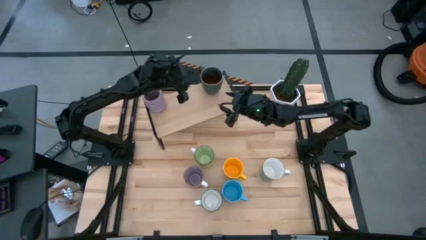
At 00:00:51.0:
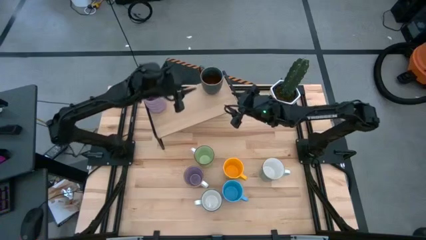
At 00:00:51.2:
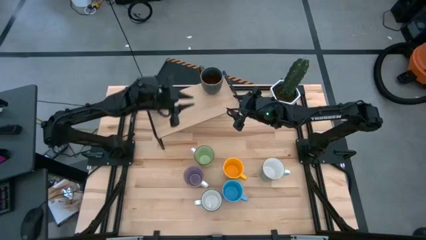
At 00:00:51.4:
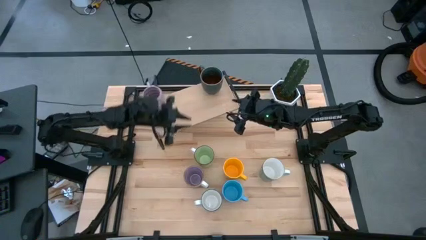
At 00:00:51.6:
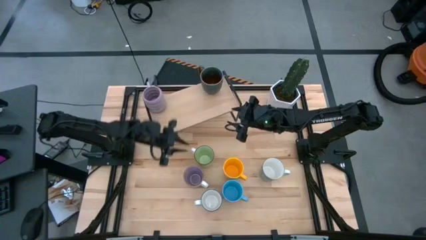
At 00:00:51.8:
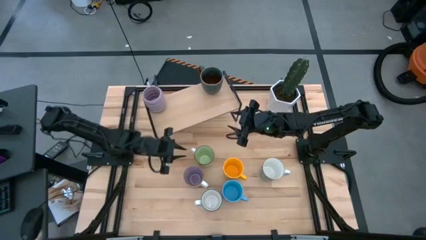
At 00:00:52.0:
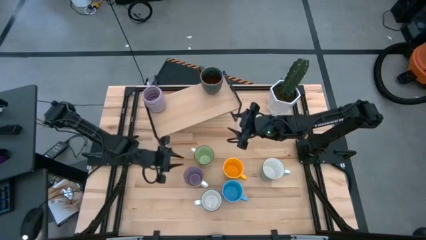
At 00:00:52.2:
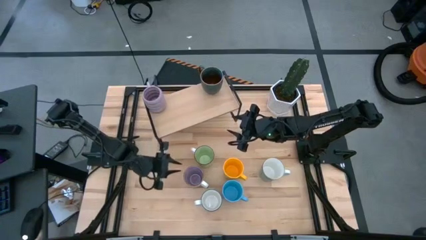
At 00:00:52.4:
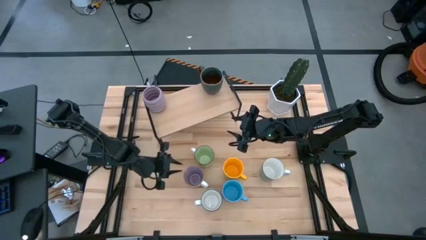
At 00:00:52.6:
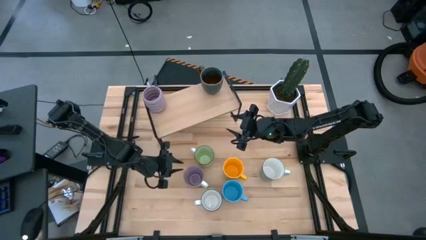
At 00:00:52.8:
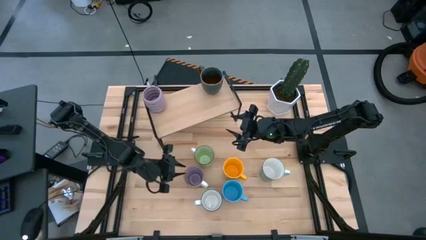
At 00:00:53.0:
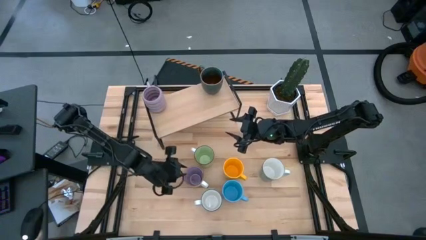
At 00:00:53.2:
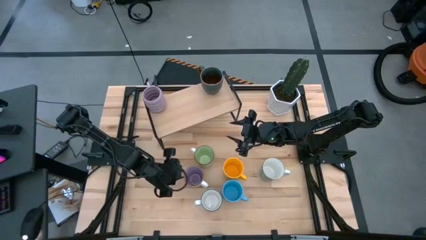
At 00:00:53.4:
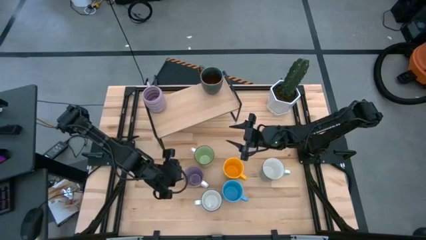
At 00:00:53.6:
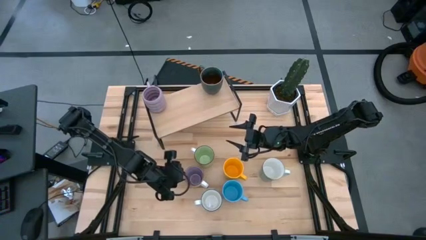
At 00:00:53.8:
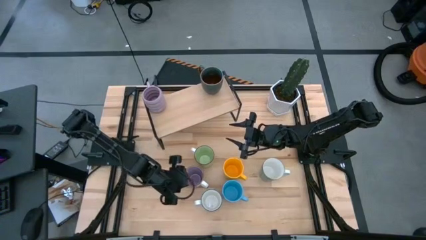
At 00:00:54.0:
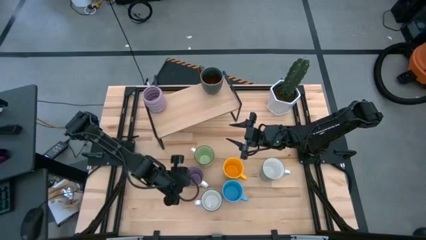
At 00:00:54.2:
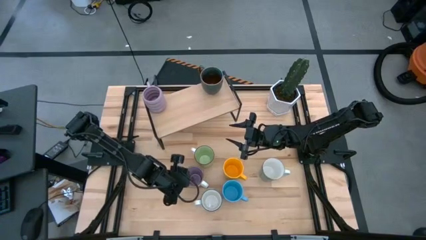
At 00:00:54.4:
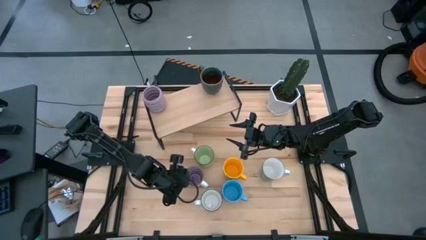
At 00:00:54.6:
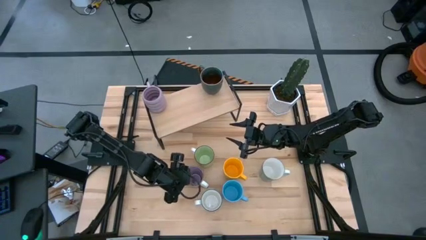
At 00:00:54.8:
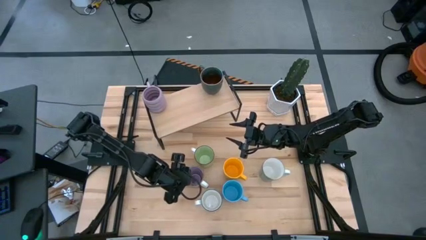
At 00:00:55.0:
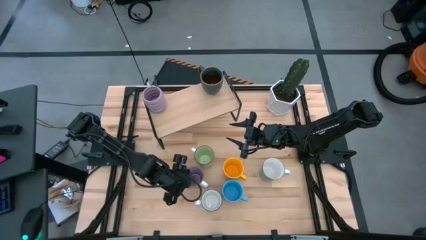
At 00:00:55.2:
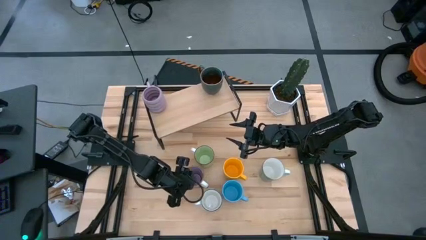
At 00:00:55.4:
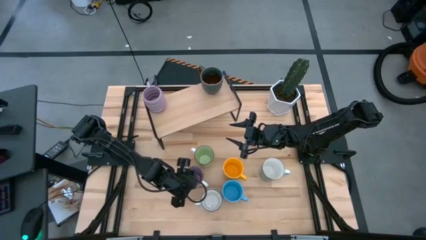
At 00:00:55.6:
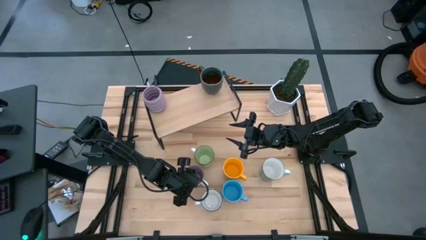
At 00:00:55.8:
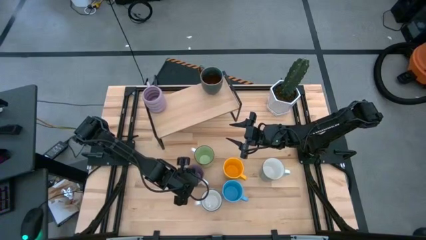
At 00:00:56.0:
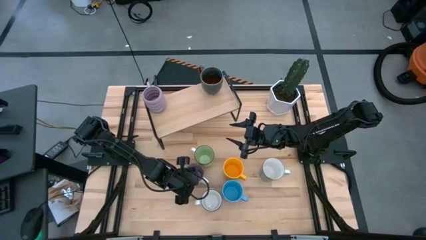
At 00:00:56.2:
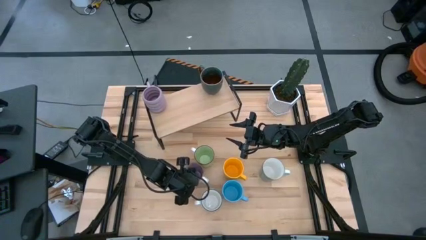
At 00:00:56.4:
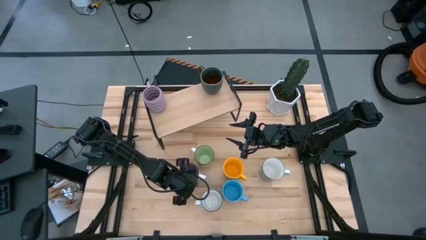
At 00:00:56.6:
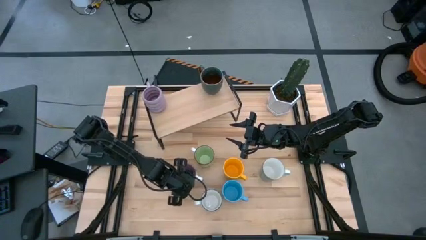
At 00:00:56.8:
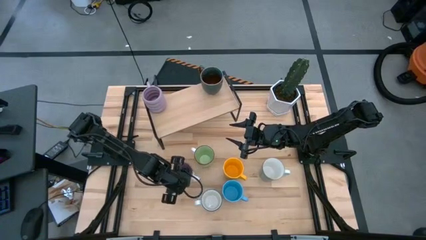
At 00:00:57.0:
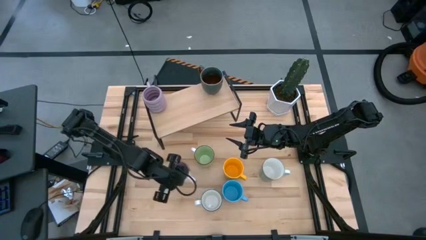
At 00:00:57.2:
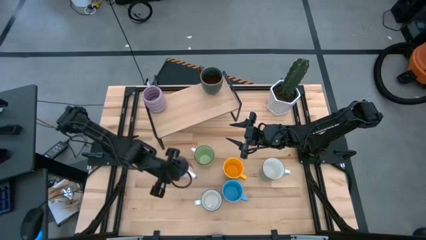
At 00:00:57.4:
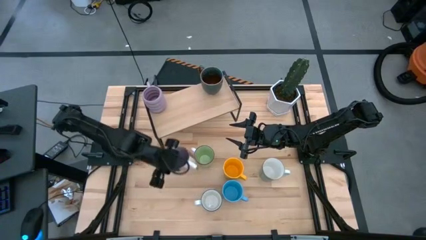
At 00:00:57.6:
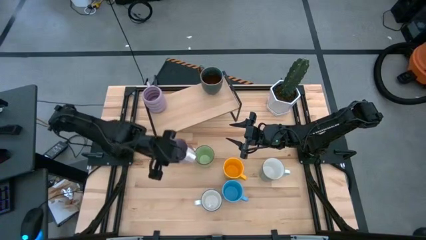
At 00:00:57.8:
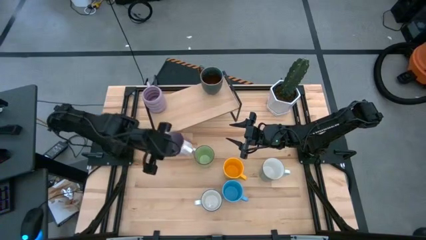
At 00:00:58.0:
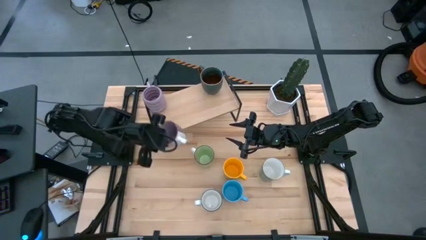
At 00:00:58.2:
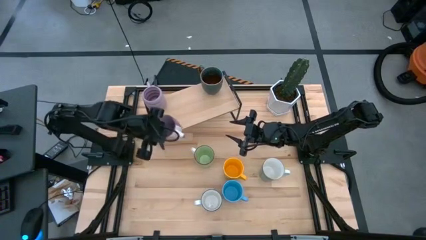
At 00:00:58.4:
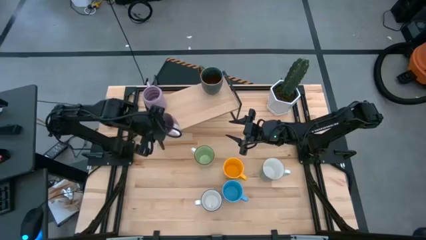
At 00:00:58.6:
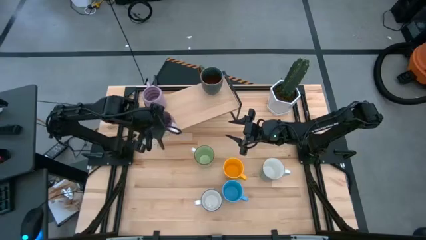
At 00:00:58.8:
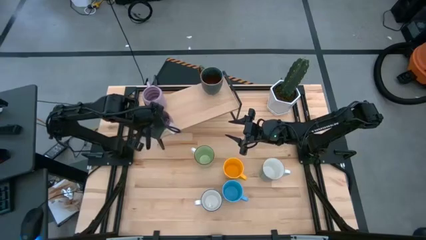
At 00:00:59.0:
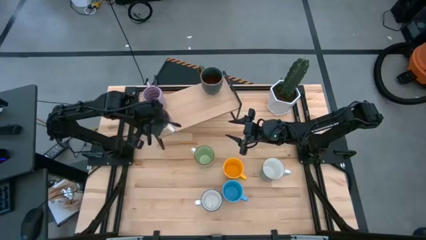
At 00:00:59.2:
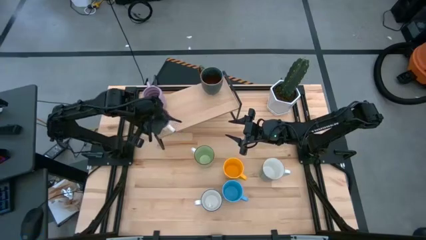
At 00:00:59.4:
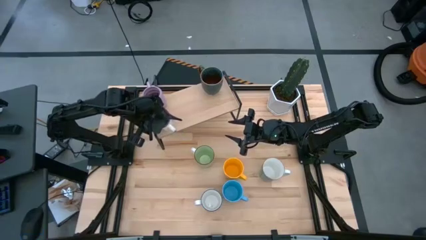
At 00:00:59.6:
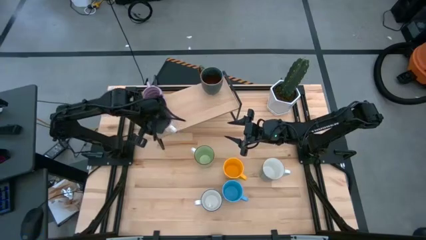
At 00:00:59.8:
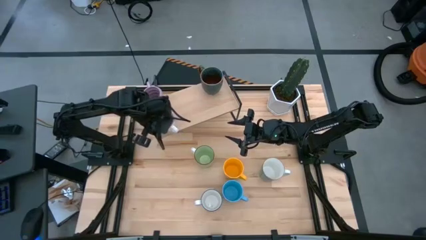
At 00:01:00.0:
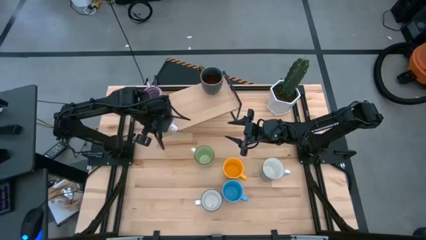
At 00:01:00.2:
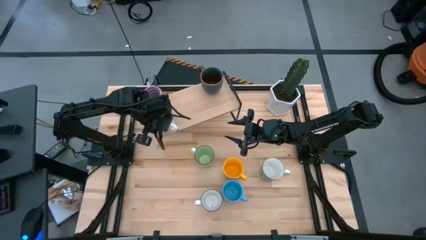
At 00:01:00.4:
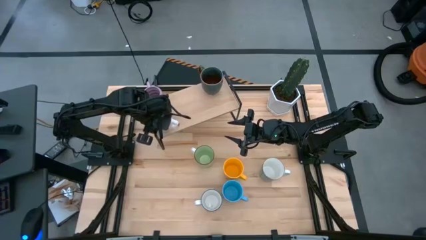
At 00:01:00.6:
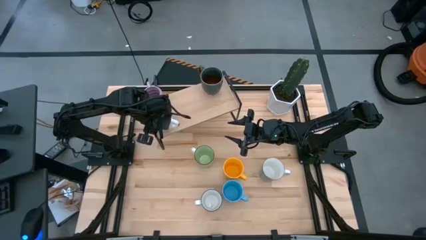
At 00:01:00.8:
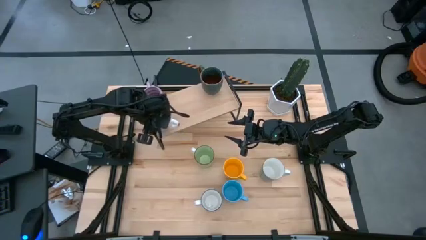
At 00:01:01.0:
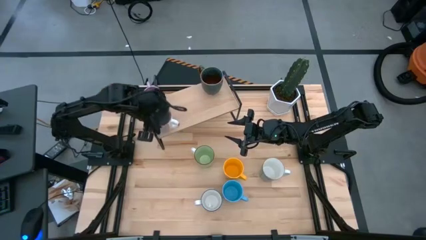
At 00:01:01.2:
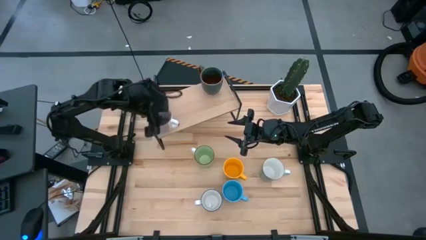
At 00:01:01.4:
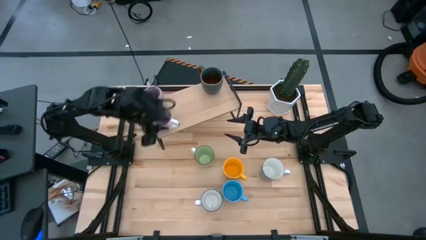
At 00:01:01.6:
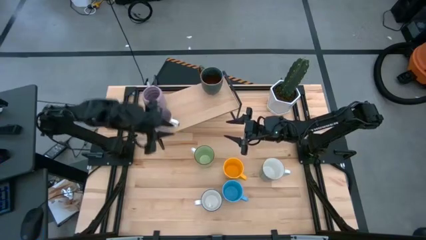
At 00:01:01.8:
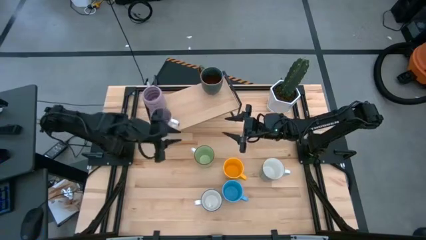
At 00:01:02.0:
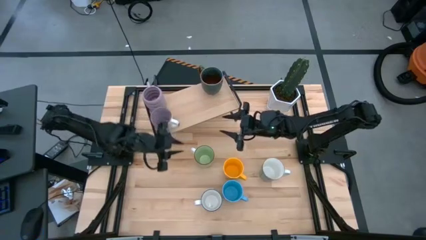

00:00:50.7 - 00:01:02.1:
Task: Place coffee mugs
Put the purple mug on the shelf aligned with the other purple mug

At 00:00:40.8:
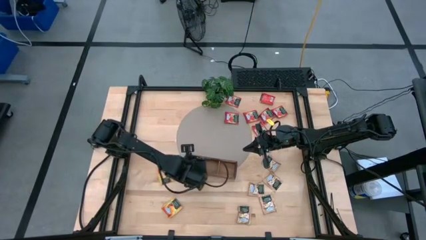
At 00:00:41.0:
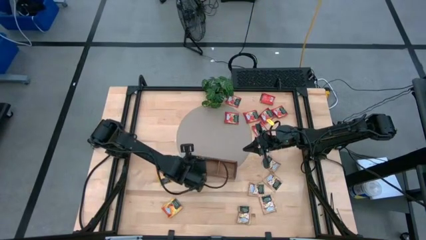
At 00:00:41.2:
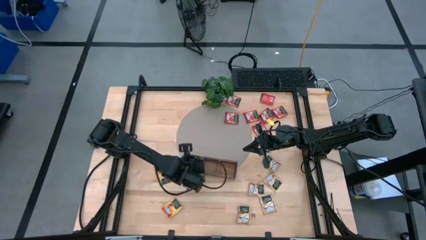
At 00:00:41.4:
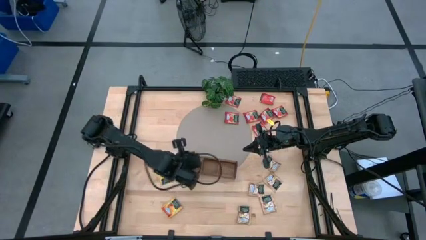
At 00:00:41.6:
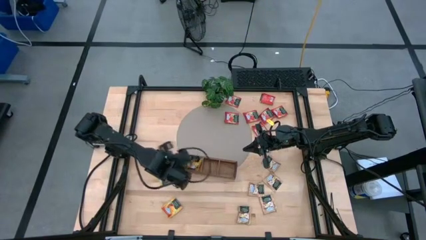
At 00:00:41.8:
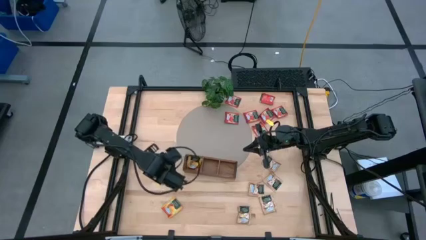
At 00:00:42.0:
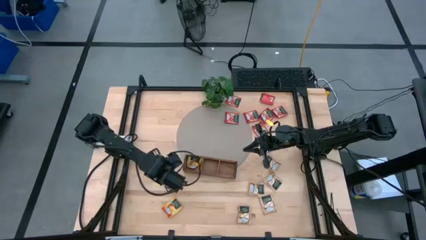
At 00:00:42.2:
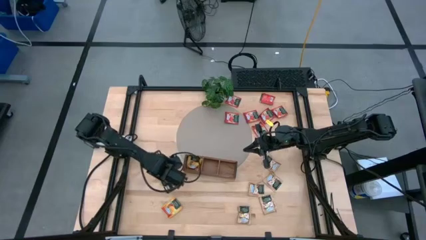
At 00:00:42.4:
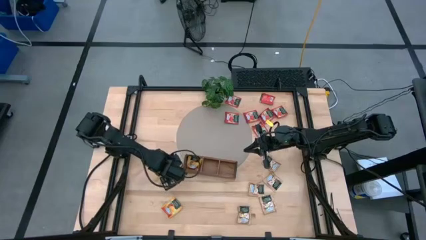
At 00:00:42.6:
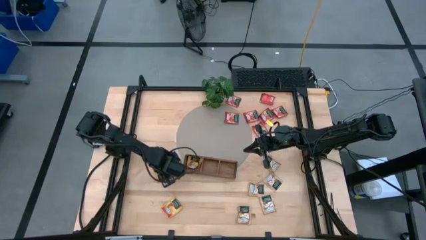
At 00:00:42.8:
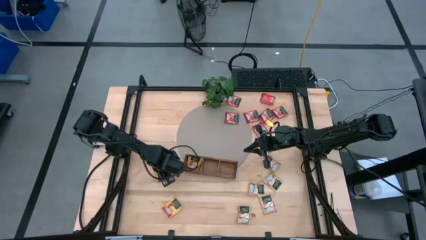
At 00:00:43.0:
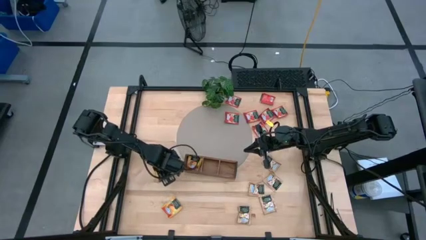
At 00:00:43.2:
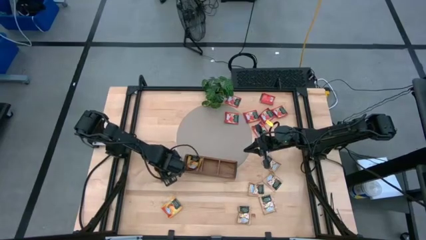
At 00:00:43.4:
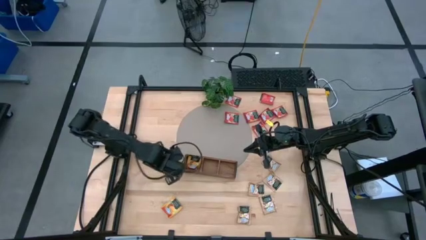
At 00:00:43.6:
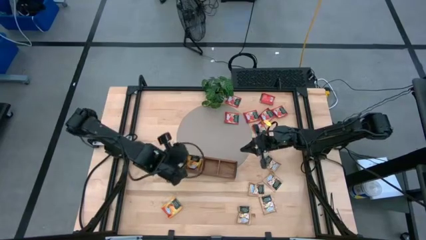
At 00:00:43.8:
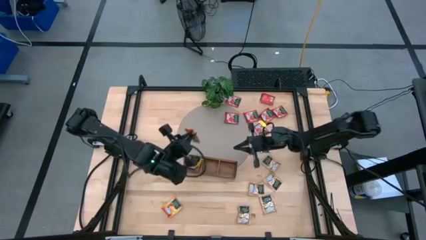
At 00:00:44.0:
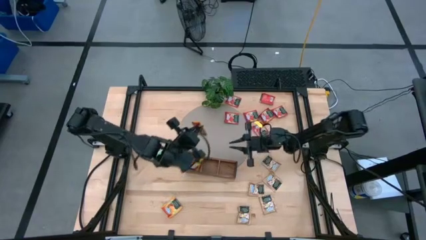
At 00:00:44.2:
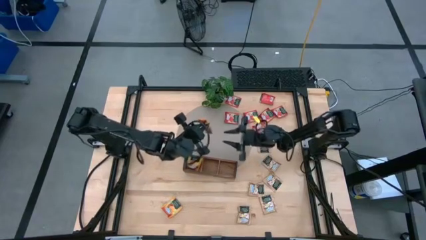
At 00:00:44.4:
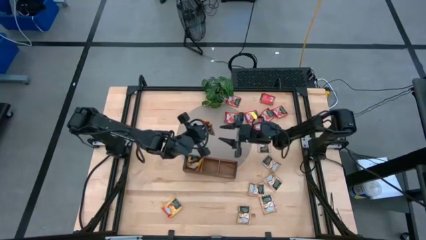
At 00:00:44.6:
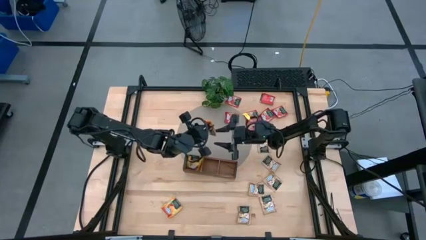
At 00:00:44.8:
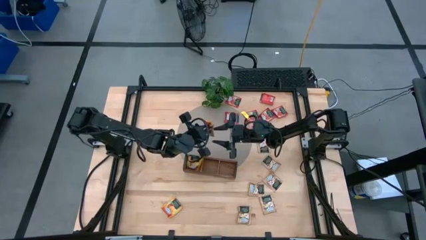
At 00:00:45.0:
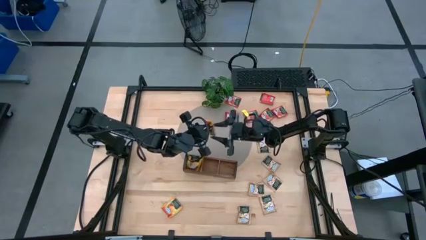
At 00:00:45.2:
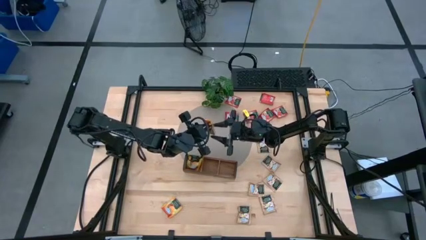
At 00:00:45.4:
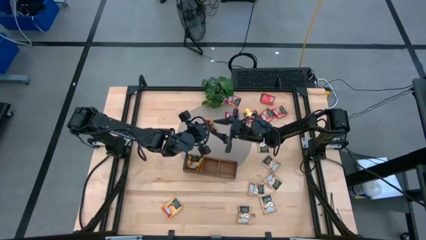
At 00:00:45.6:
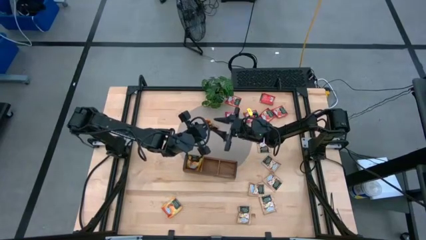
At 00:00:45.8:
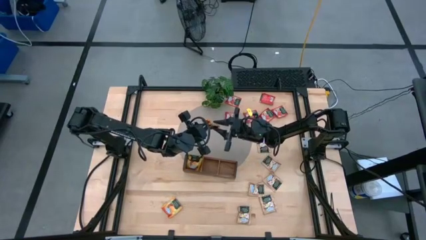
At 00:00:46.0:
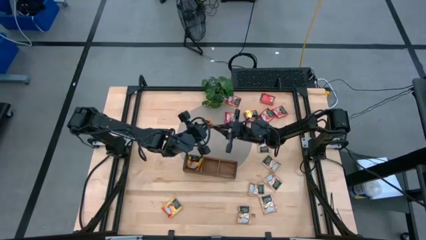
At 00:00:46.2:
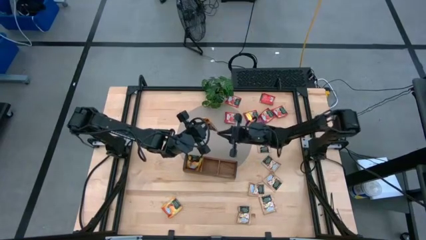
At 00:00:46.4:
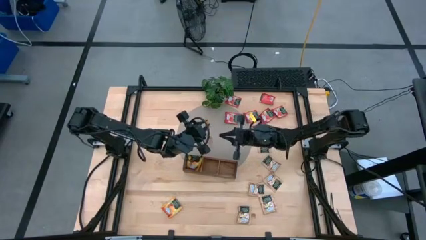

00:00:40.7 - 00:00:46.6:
Task: Pick & Place Tea
Put the top orange tea bag into the left slot of the wooden organizer
